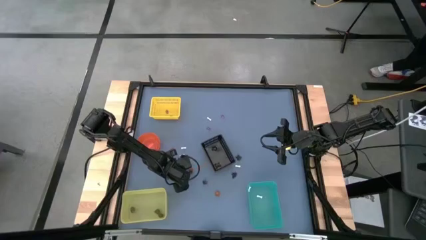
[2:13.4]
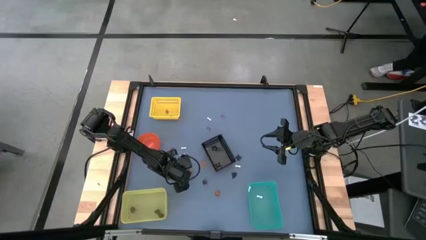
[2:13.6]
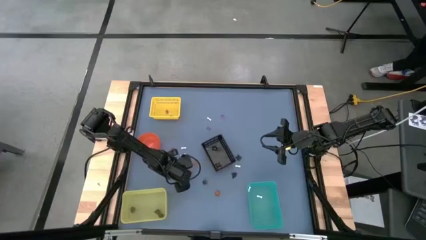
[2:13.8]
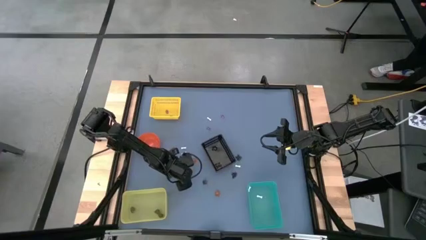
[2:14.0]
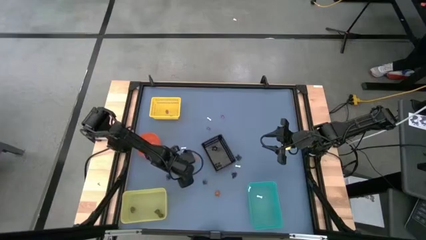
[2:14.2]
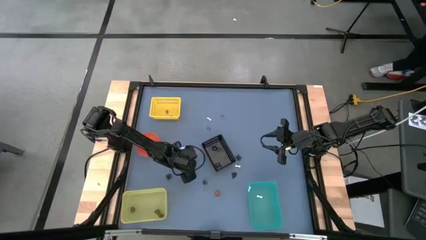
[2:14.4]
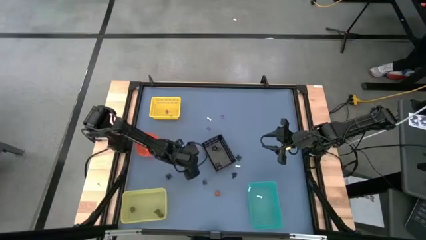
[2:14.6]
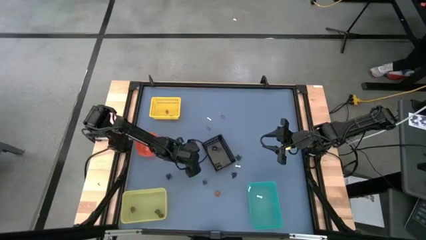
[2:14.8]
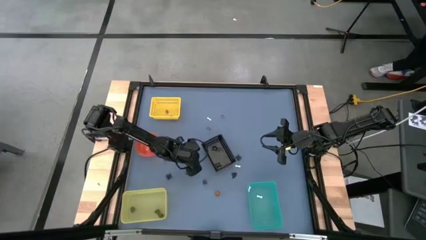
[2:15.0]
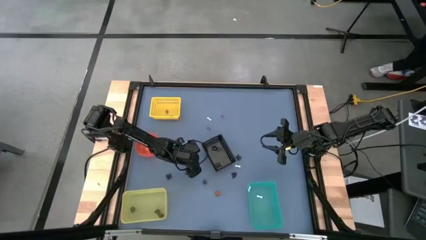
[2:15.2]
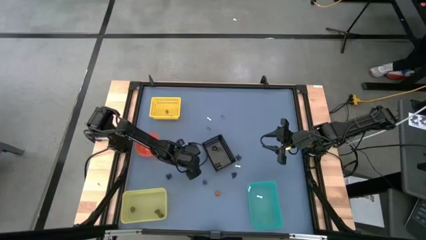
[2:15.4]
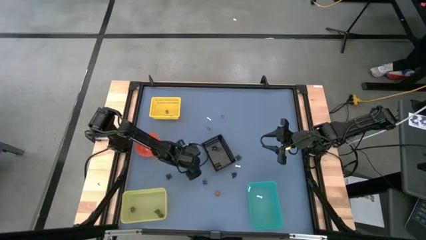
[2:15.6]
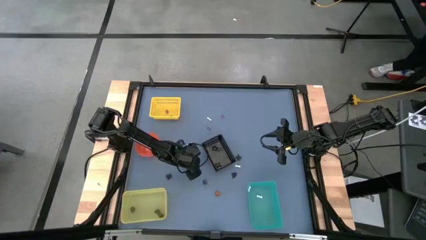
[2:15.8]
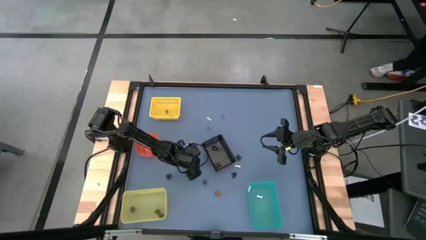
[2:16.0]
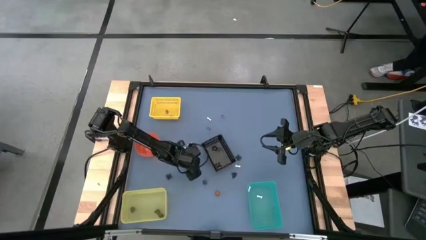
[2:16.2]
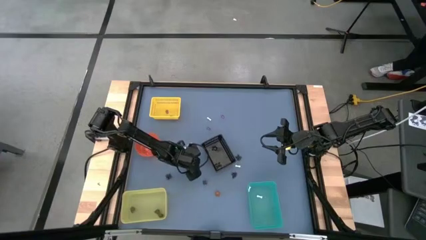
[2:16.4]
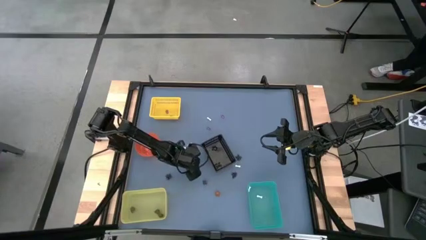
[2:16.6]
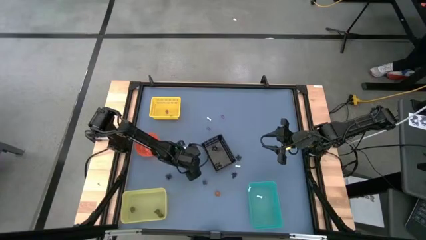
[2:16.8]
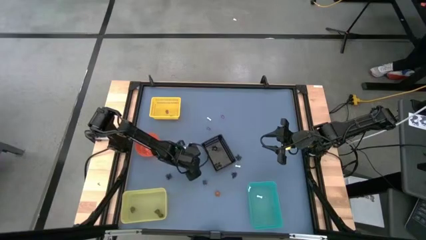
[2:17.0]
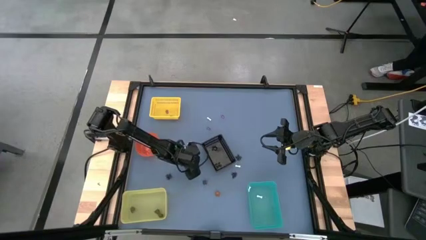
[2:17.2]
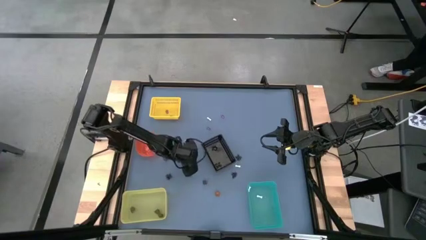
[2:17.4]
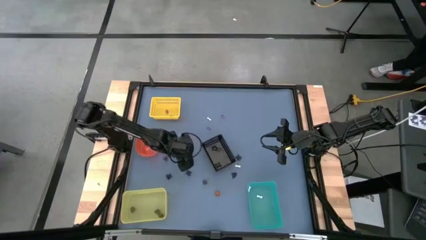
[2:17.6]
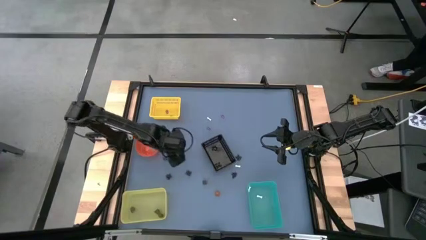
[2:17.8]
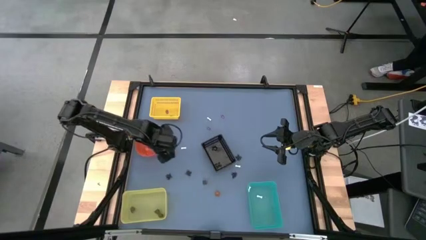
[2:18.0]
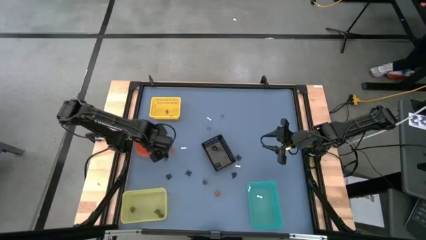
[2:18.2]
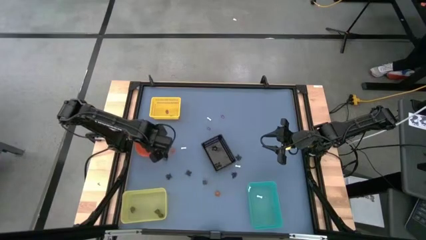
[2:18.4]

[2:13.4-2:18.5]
Task: Sort Halloween decoration
Put the orange pumpkin toy into the orange bin

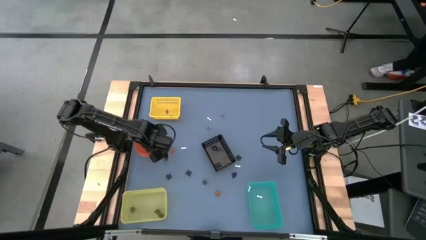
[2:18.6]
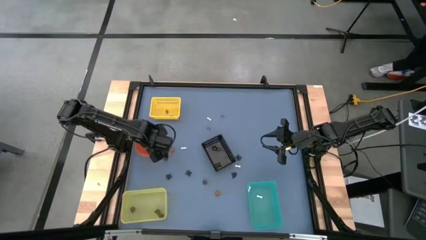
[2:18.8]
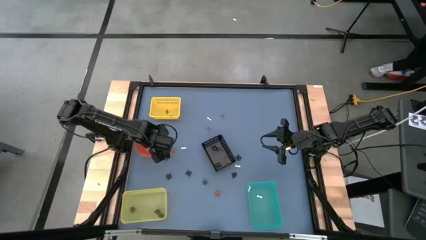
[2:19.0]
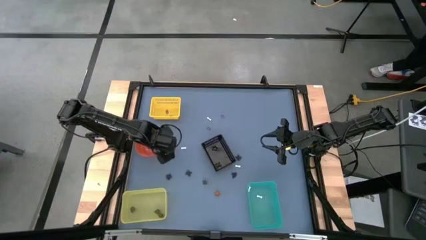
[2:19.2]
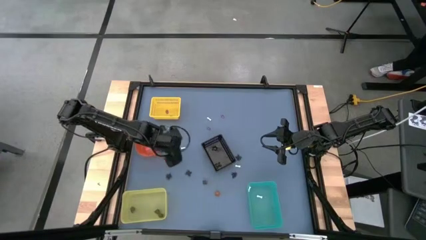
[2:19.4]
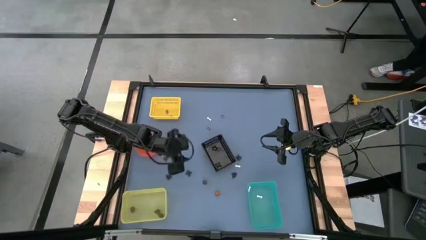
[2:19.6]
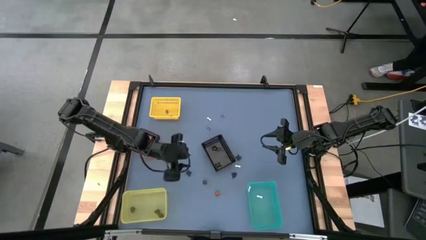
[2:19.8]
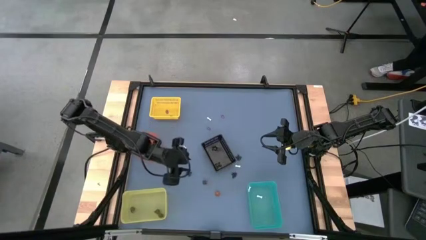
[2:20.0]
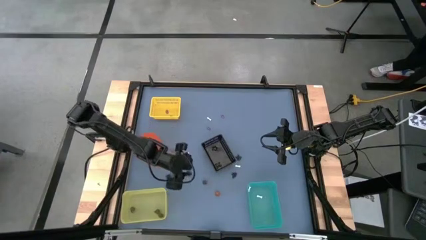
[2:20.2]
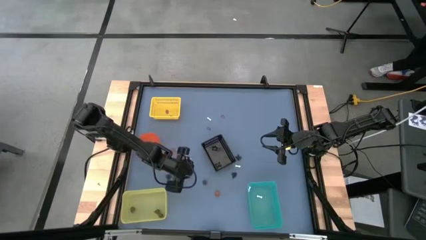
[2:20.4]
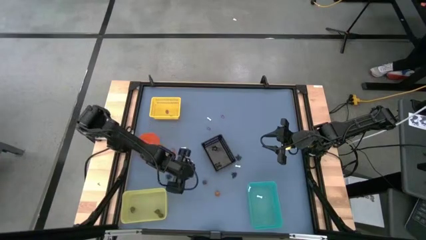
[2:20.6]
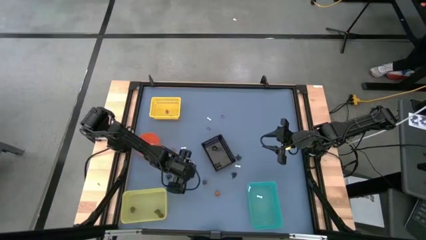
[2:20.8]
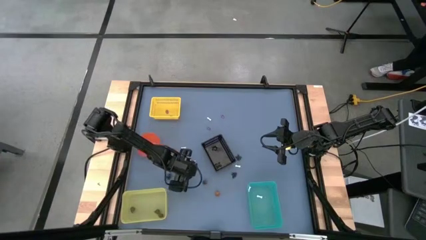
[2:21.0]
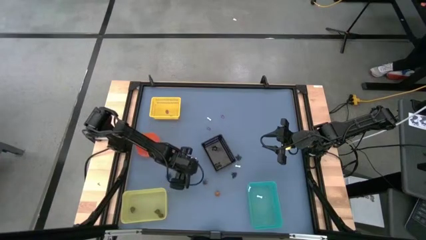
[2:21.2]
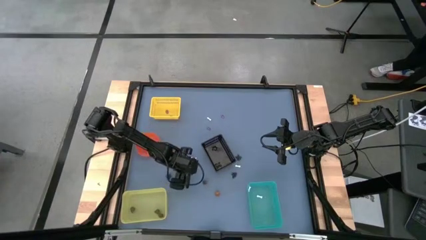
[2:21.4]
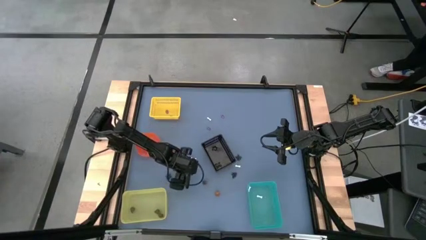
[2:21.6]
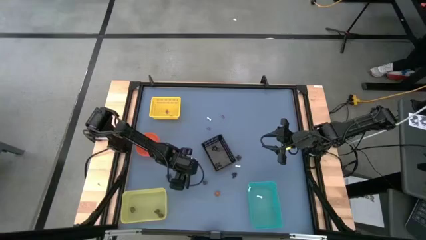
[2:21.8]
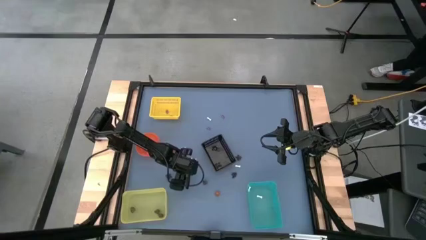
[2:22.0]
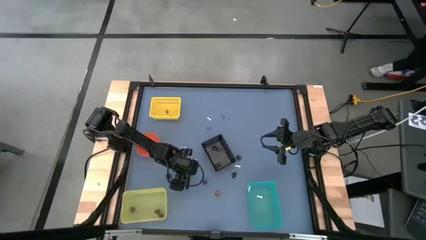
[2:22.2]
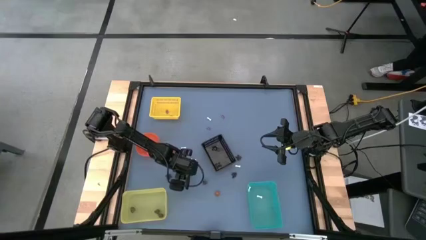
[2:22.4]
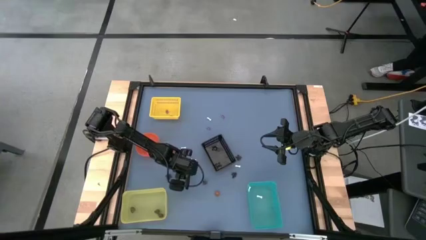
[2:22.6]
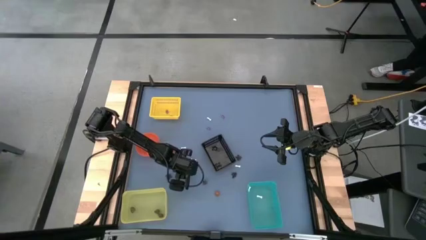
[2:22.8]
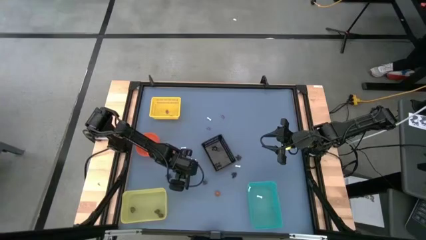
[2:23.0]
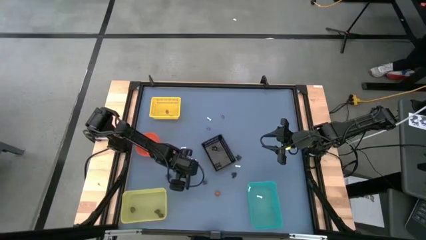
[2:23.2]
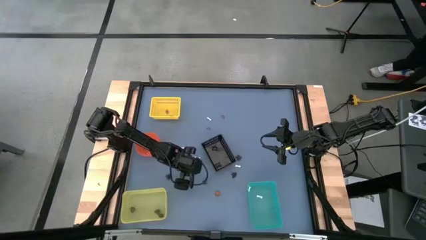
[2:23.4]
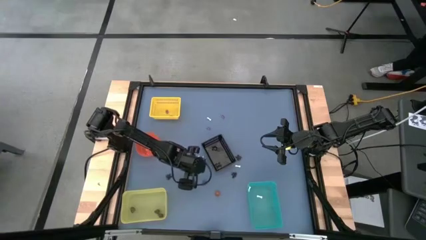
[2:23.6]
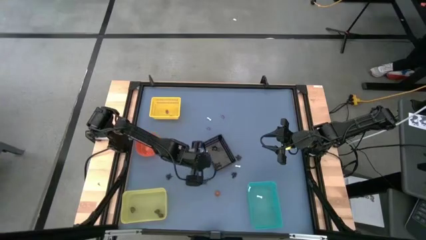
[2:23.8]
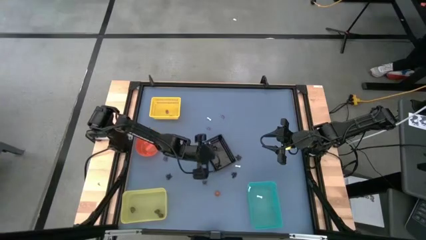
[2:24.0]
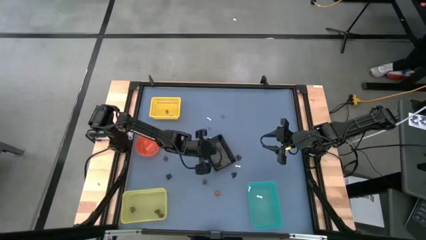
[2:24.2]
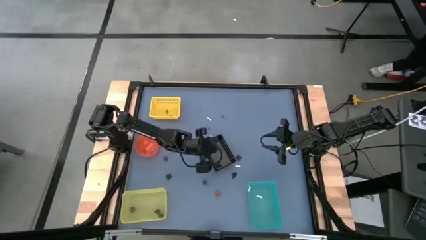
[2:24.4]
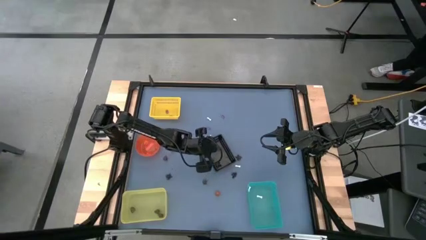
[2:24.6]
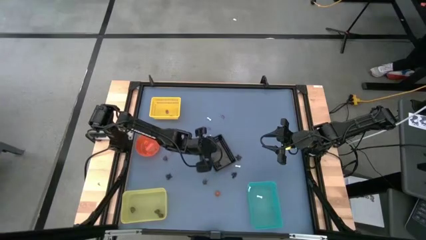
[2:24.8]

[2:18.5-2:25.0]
Put the black spider toy into the black bin

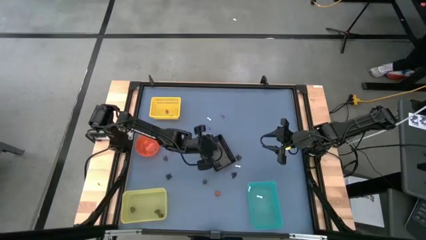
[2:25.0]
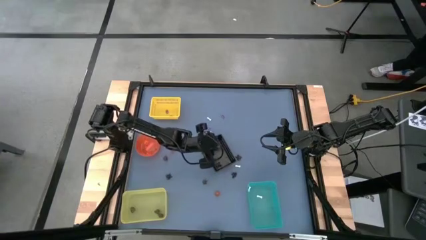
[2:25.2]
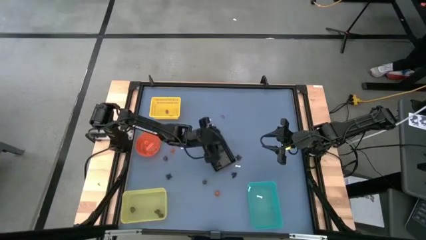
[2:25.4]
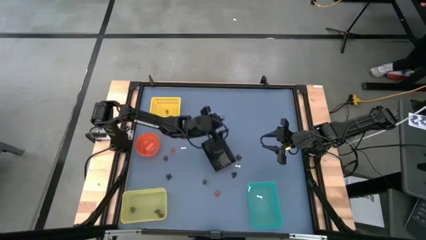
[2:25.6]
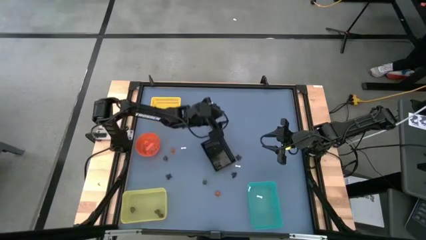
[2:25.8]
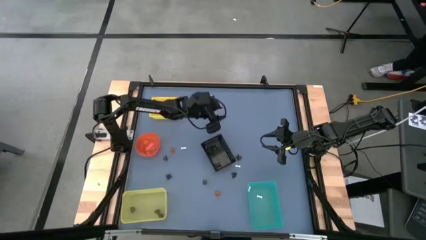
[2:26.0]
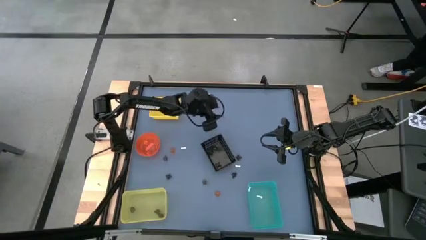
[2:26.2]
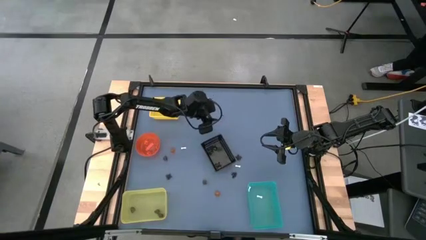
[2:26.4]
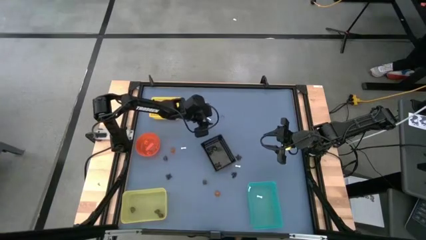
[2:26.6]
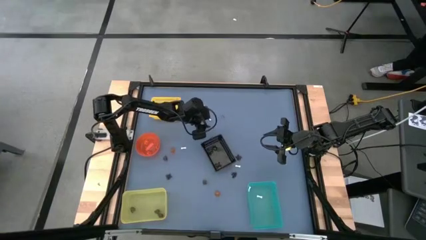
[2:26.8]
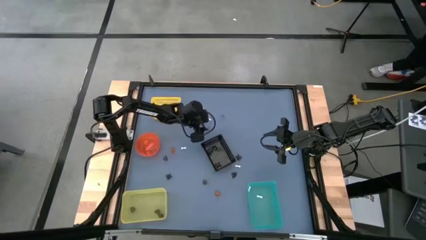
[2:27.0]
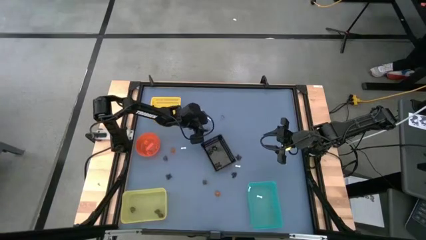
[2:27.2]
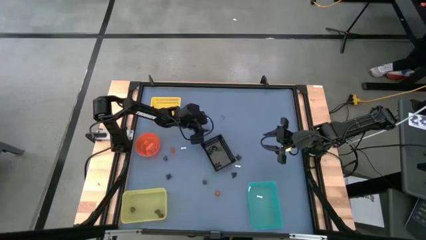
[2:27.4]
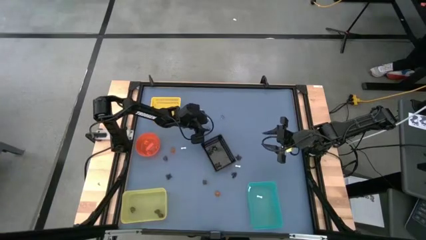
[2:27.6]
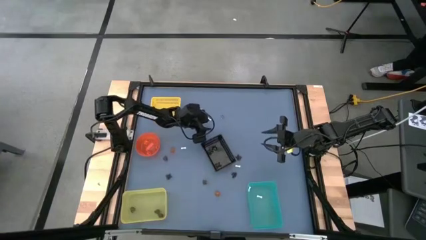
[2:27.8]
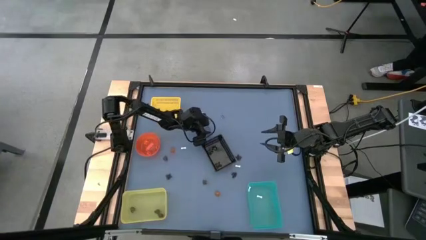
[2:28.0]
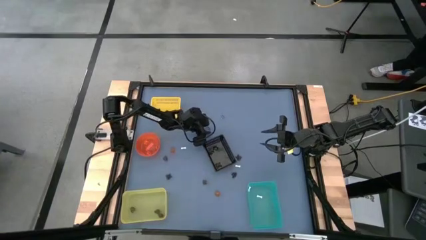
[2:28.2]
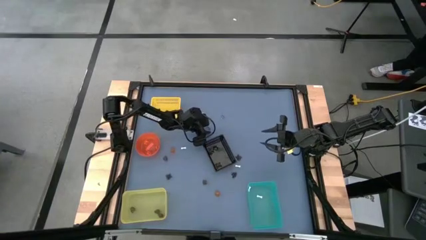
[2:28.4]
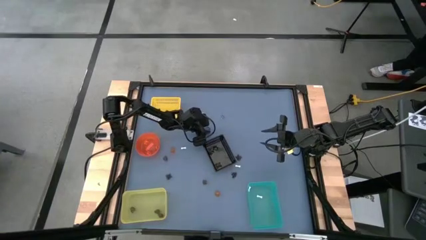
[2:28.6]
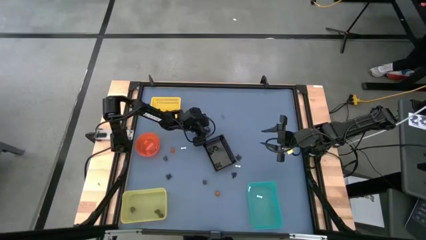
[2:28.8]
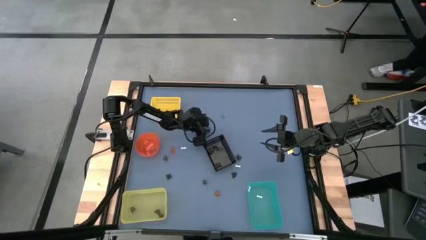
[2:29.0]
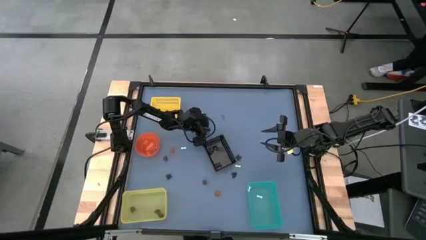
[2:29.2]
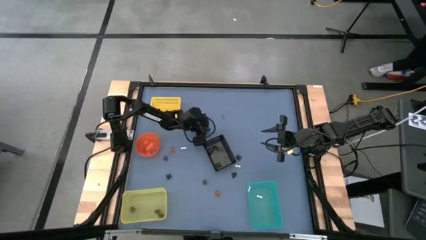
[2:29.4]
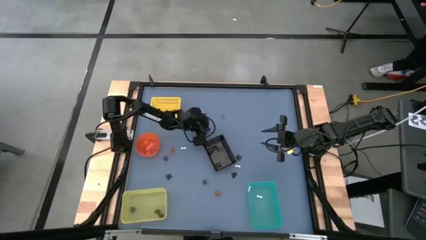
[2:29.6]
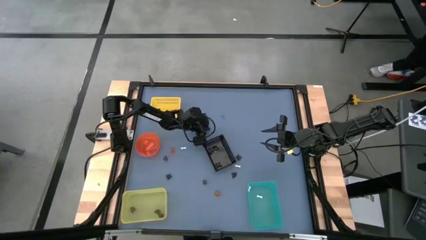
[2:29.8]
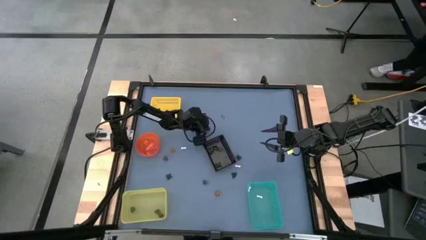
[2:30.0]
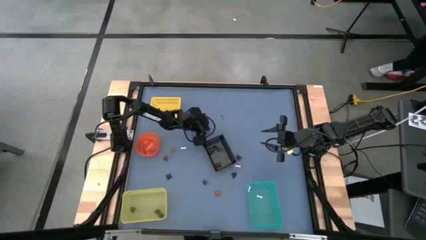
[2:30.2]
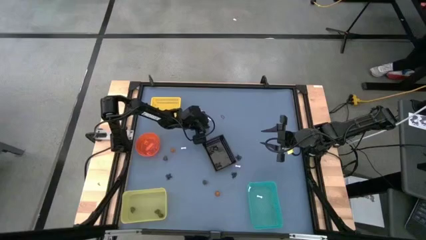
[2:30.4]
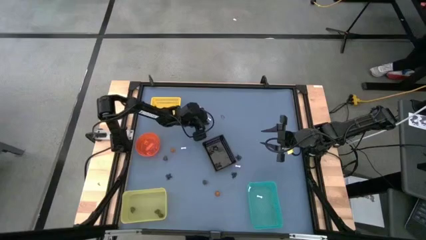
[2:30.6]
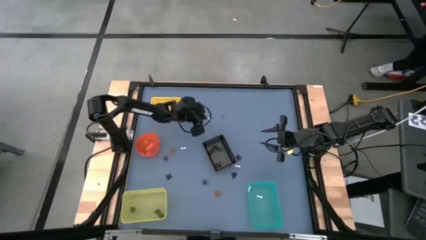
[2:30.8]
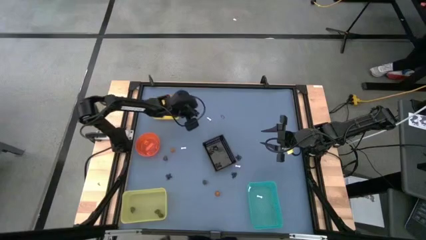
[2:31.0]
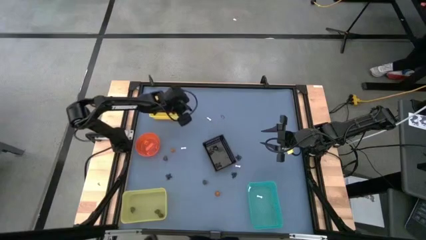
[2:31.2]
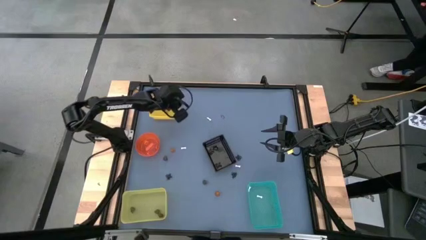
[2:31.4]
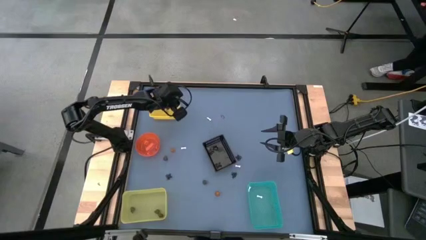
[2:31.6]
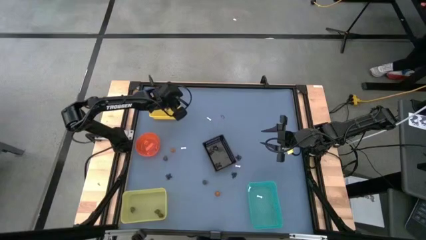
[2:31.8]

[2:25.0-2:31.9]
Put the violet witch hat toy into the top yellow bin
